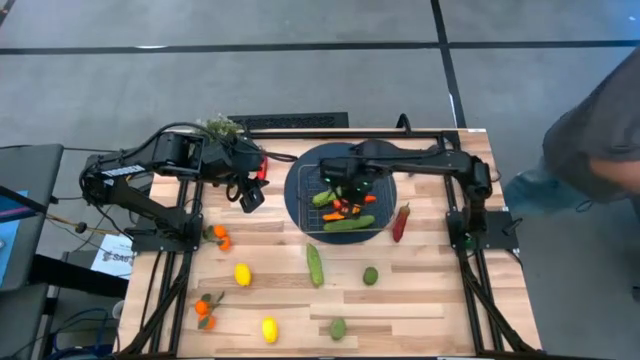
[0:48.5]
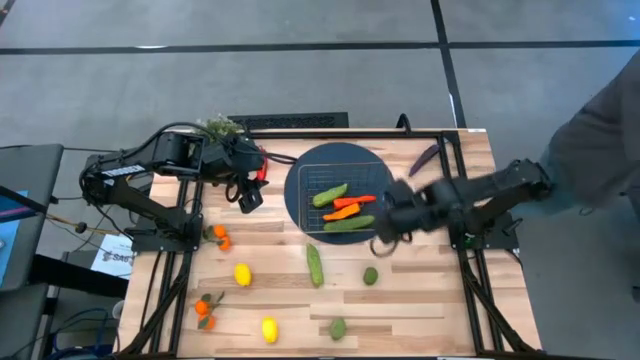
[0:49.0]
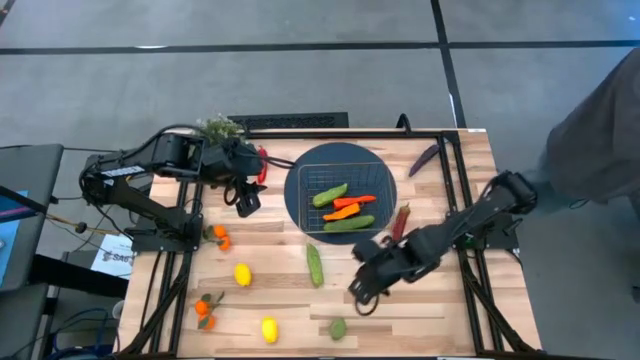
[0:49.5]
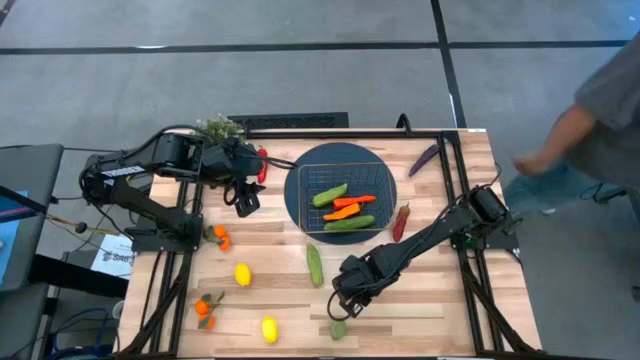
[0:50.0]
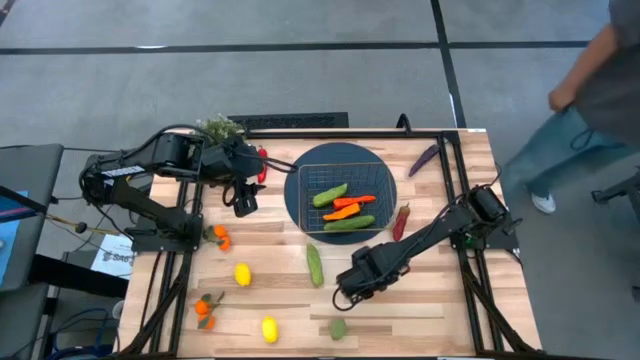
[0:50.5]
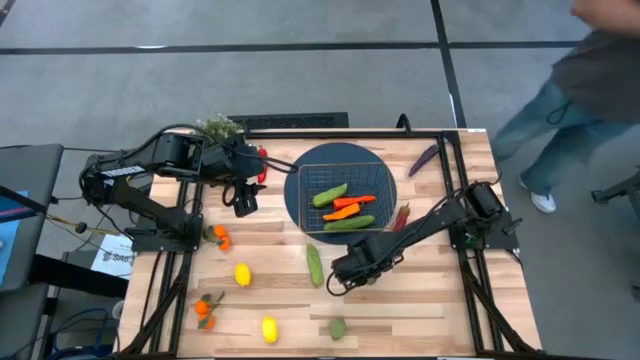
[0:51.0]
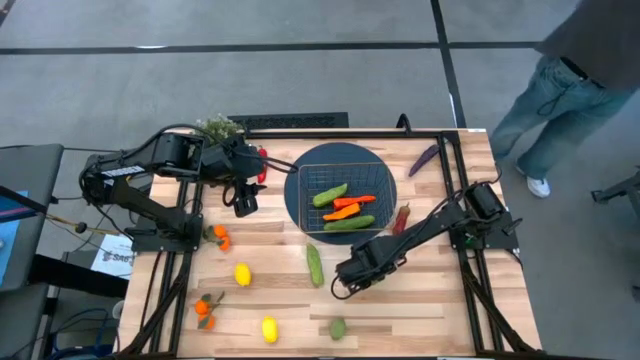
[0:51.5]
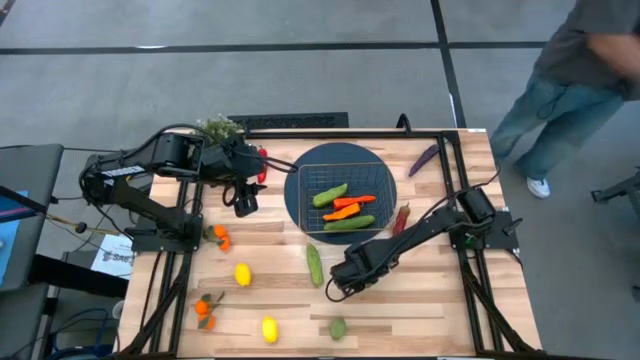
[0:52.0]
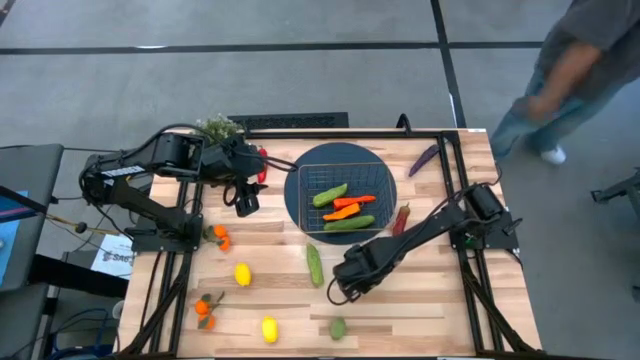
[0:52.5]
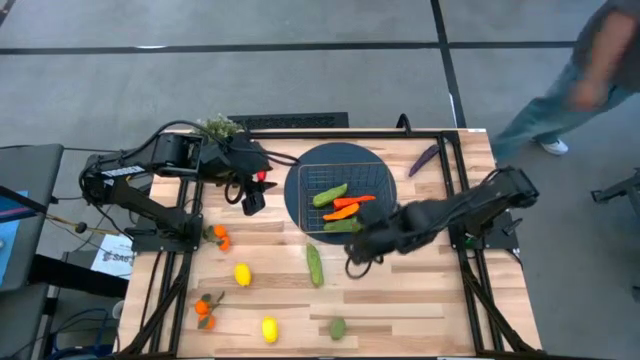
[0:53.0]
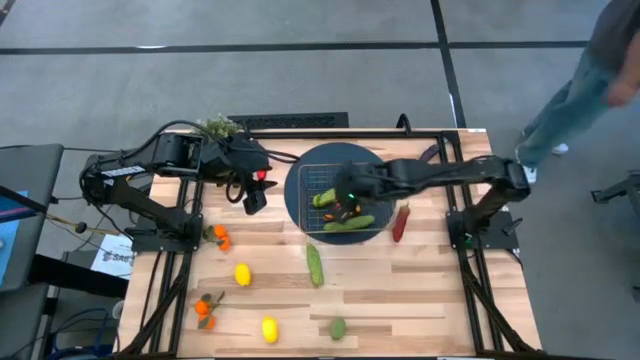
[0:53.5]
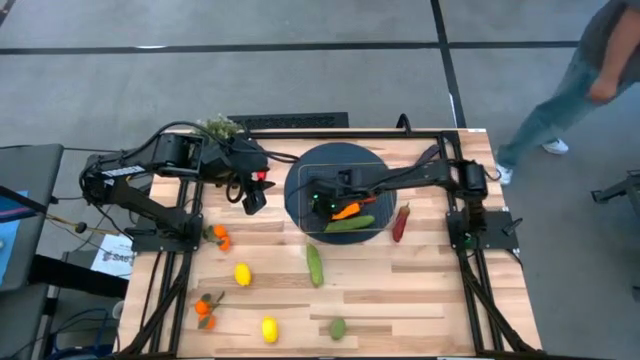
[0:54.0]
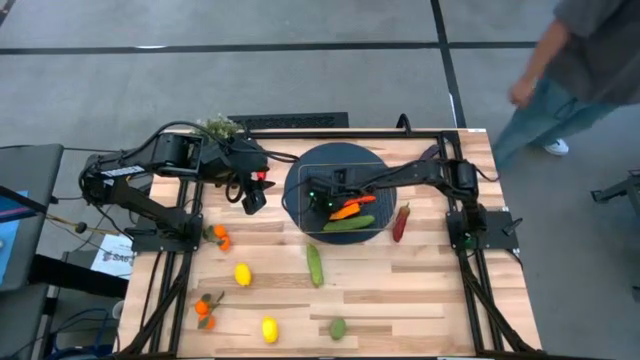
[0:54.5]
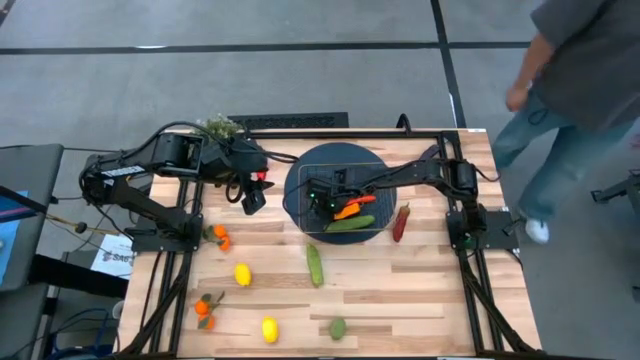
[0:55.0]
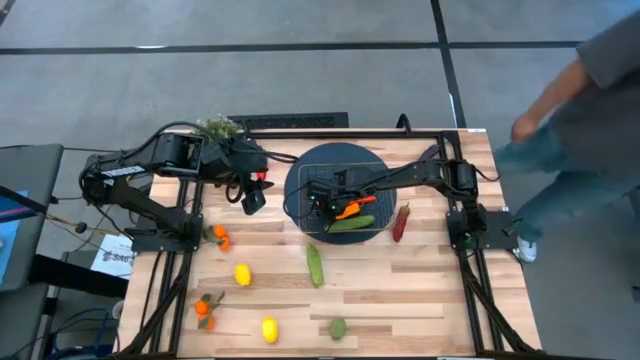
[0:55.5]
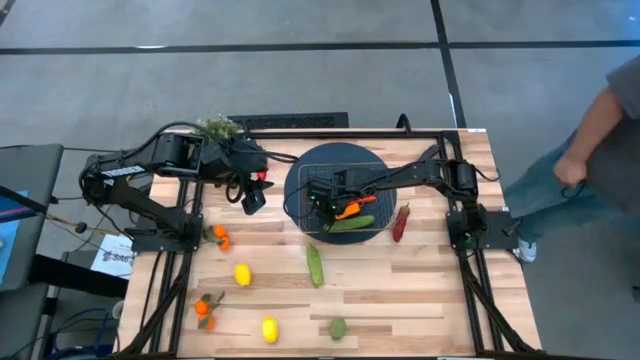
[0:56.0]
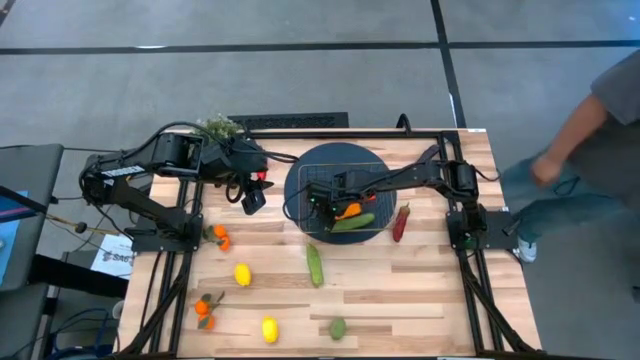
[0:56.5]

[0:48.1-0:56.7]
Task: Build produce basket
Put the top green lime into the wire basket

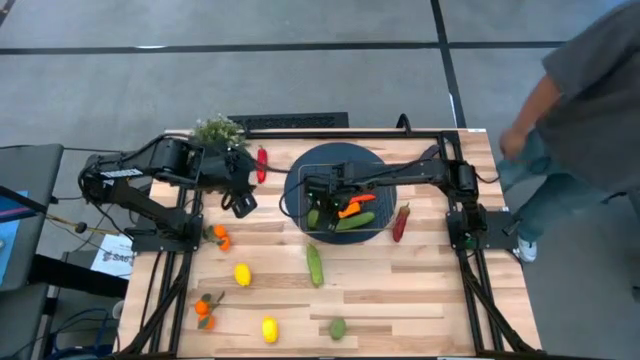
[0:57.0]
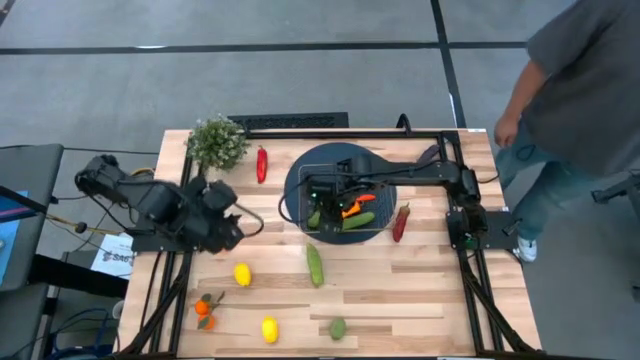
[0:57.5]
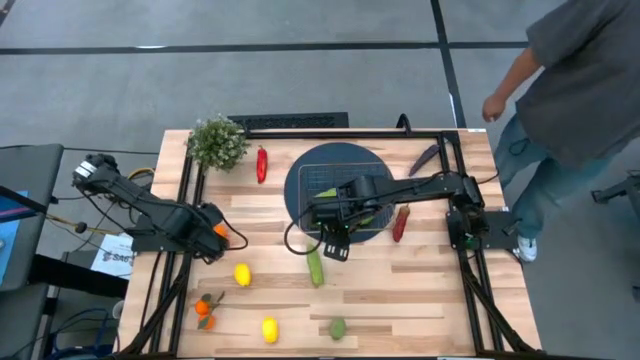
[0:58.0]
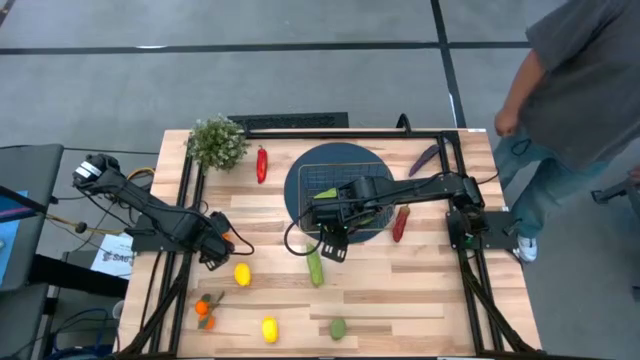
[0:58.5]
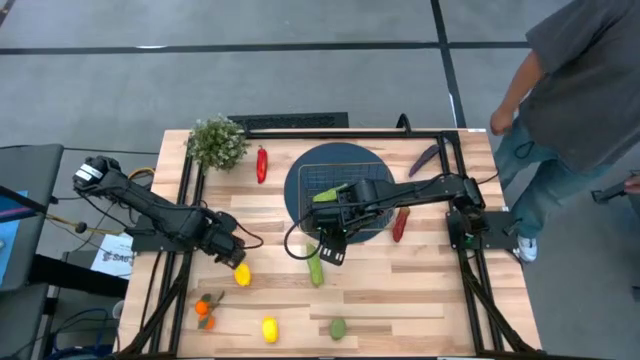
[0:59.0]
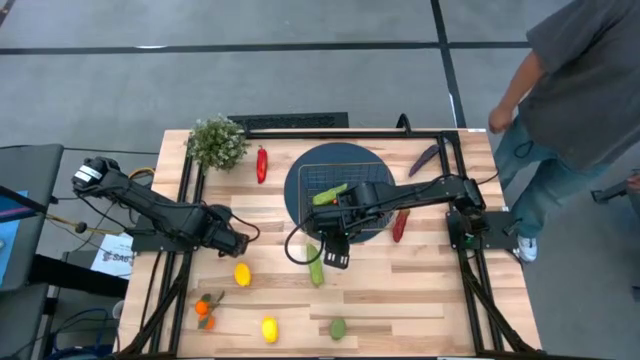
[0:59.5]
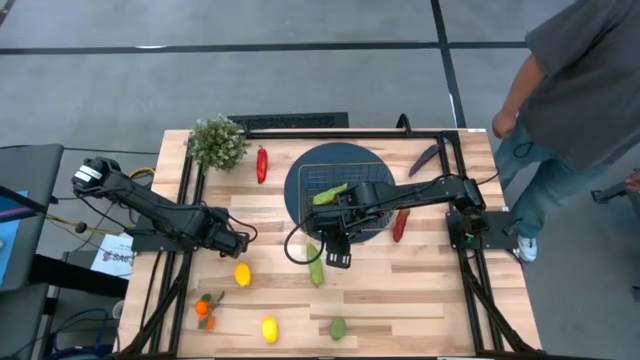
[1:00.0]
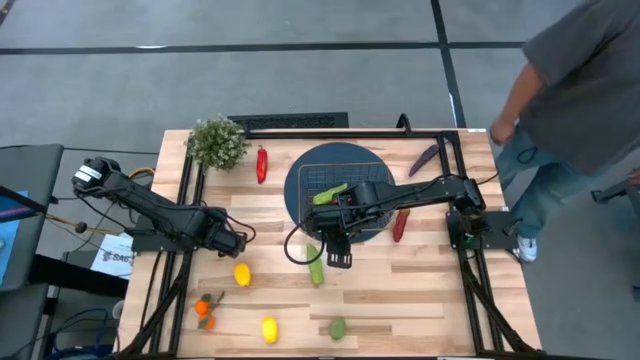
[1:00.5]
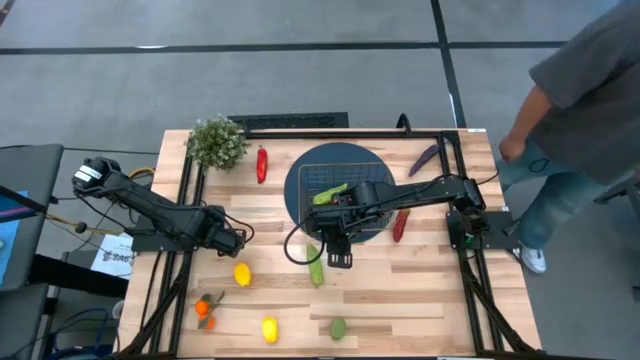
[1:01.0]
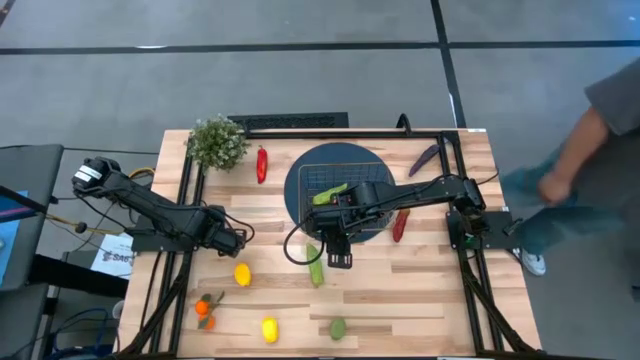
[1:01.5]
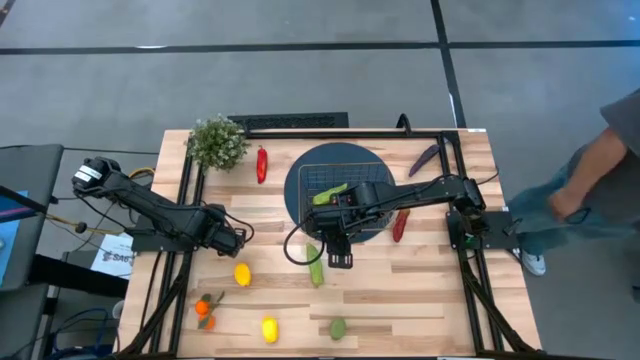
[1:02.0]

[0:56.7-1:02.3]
Put the top orange tangerine into the wire basket

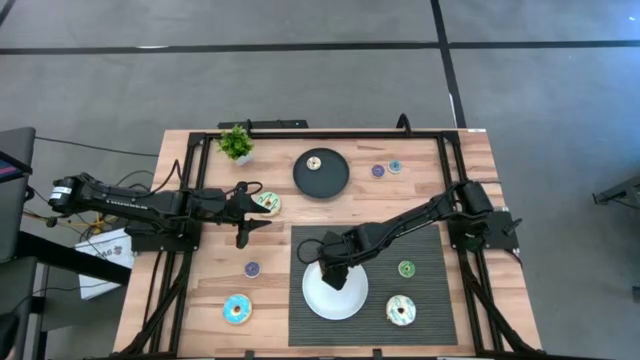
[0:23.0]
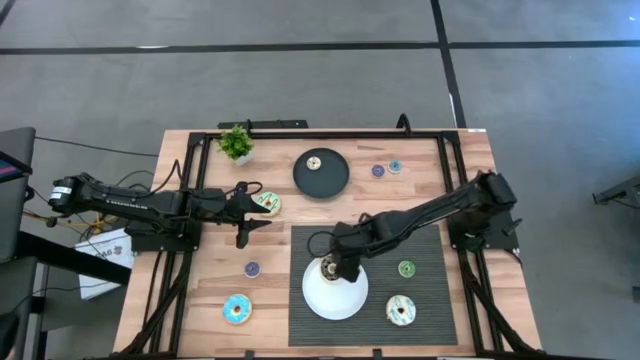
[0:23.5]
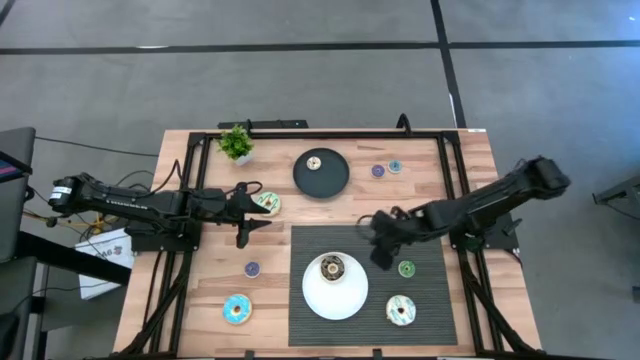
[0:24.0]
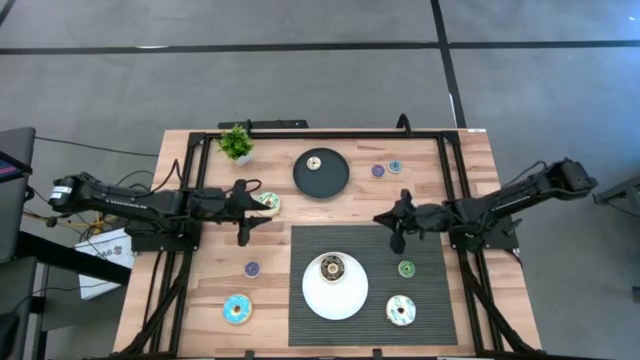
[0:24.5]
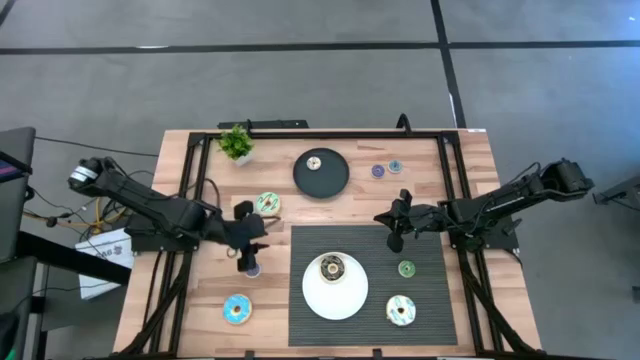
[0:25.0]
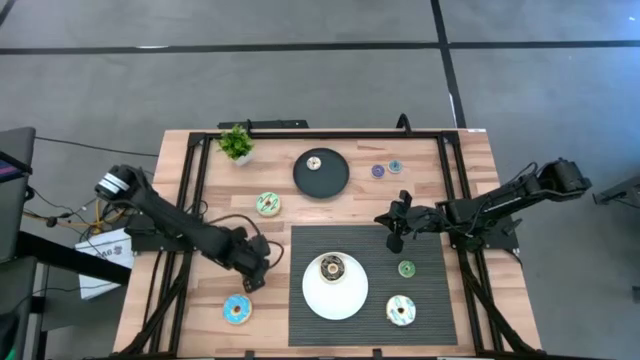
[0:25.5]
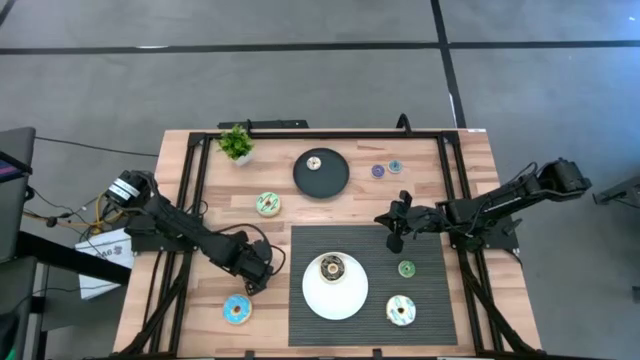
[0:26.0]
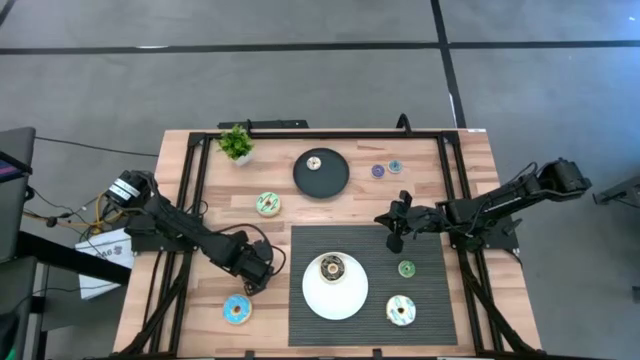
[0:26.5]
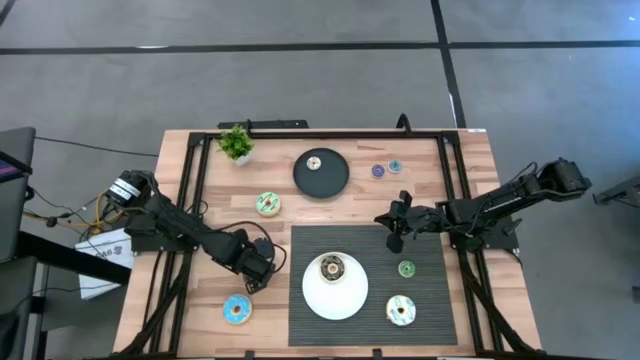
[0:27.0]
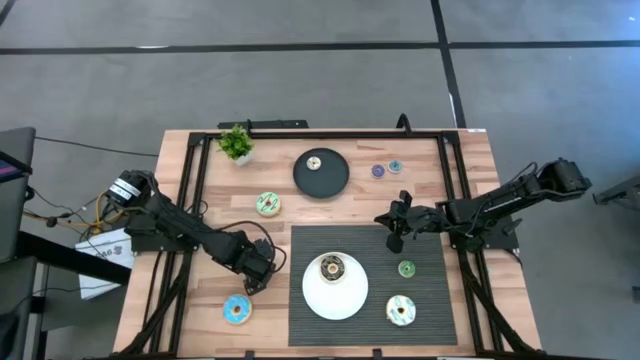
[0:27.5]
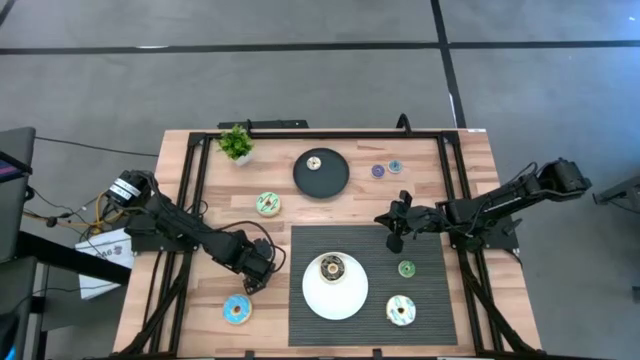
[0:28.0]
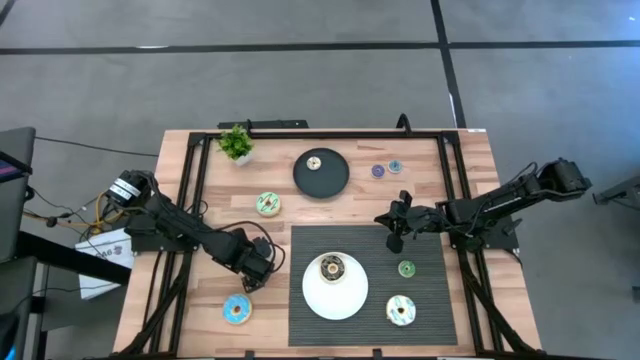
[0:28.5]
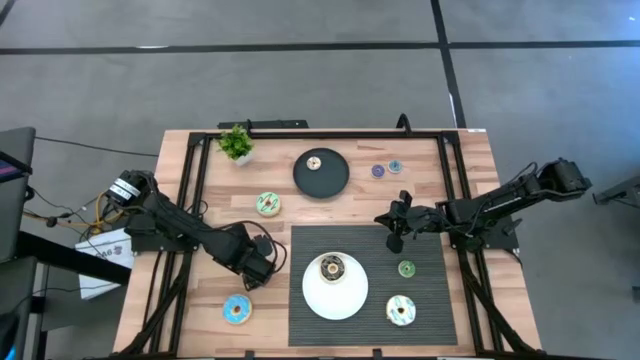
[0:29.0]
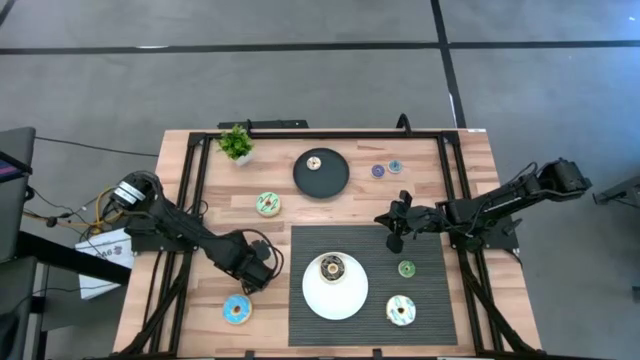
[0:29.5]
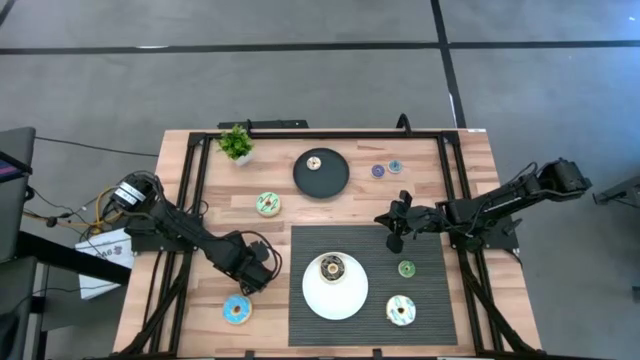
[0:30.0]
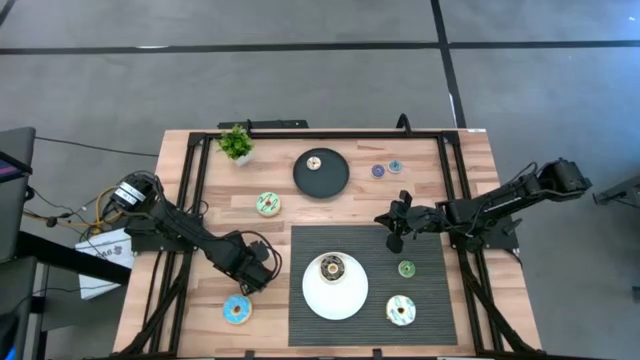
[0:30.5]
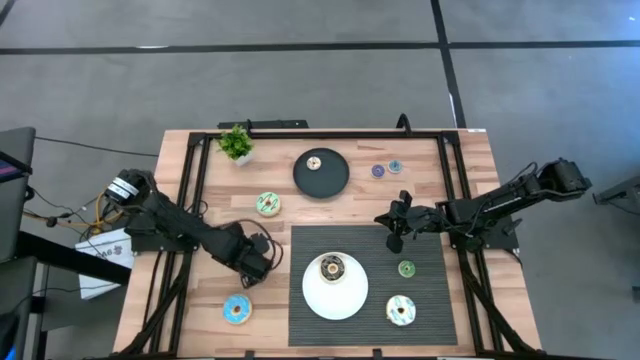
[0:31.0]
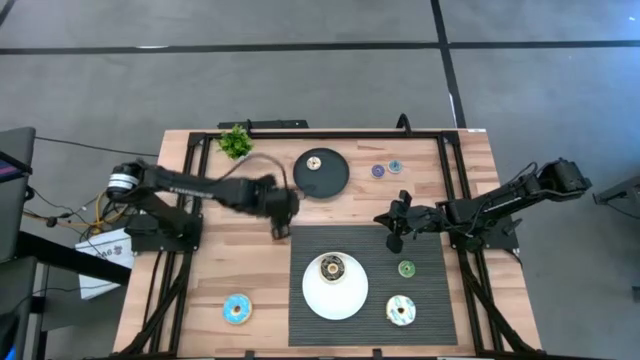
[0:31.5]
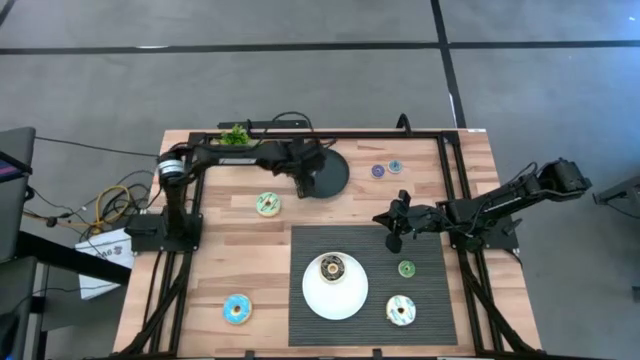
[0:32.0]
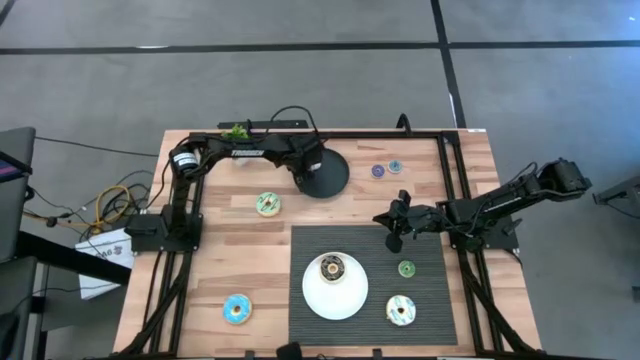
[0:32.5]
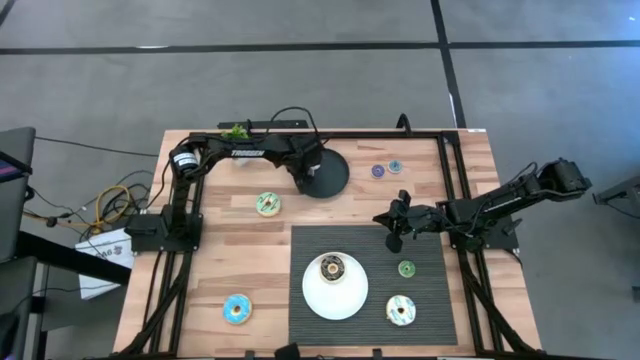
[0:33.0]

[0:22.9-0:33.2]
Task: Pick & Place donuts
Put the small blue donut on the black plate
